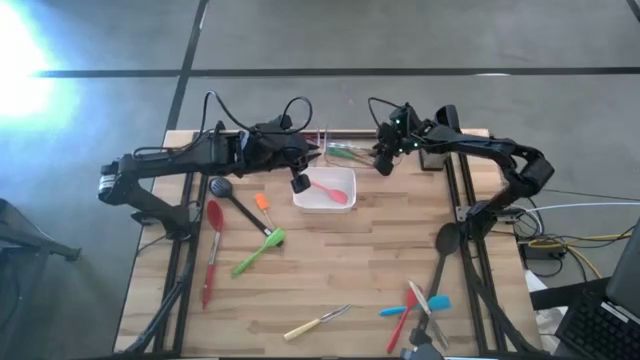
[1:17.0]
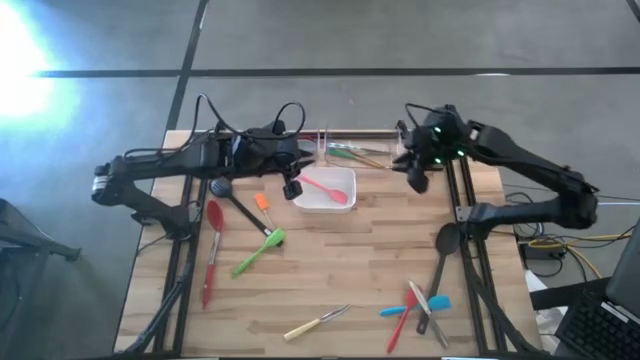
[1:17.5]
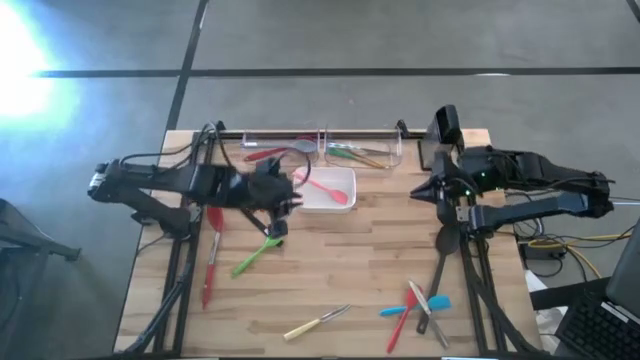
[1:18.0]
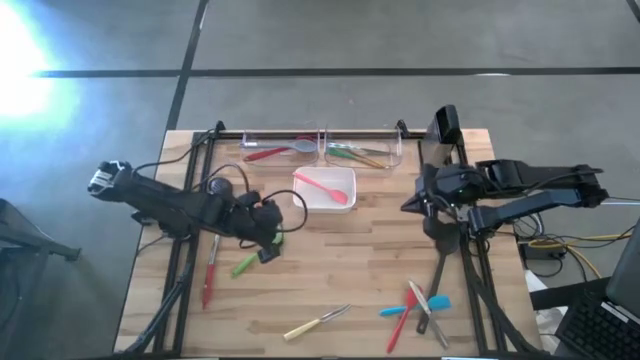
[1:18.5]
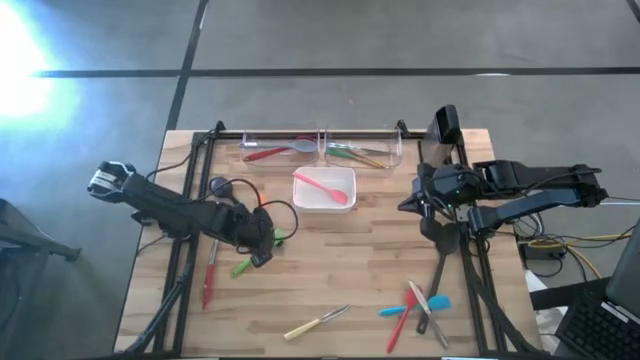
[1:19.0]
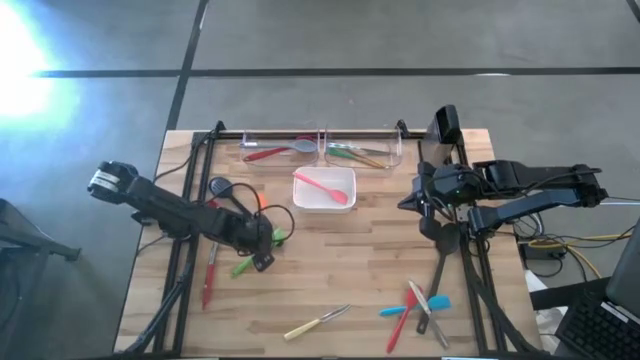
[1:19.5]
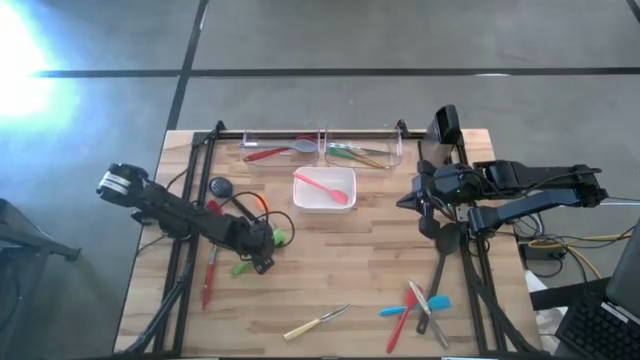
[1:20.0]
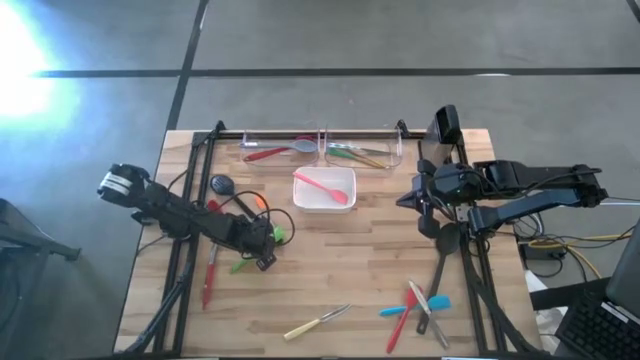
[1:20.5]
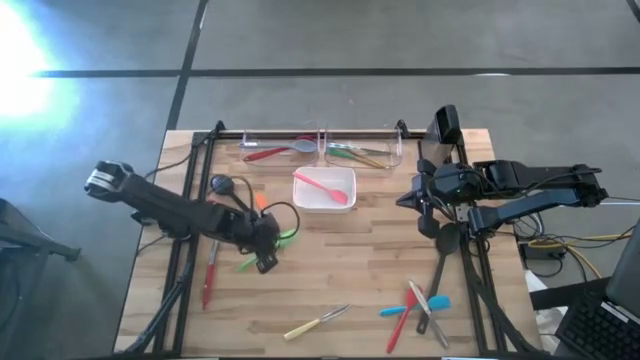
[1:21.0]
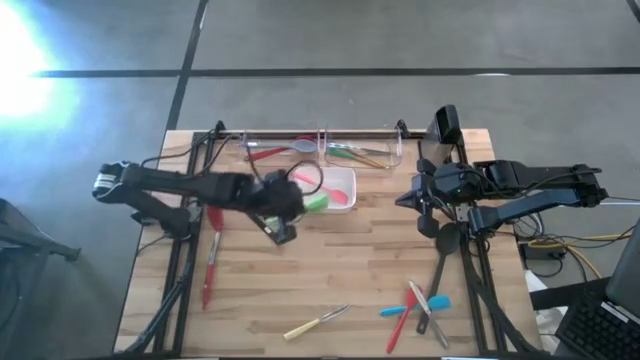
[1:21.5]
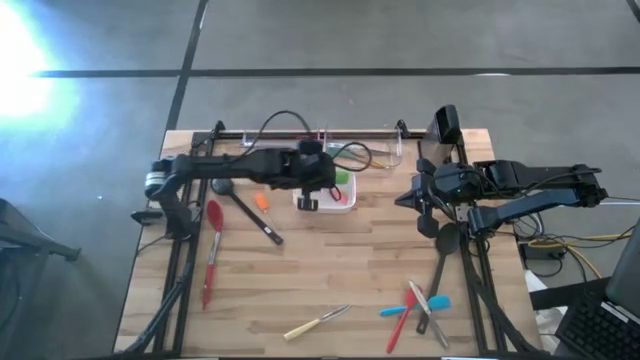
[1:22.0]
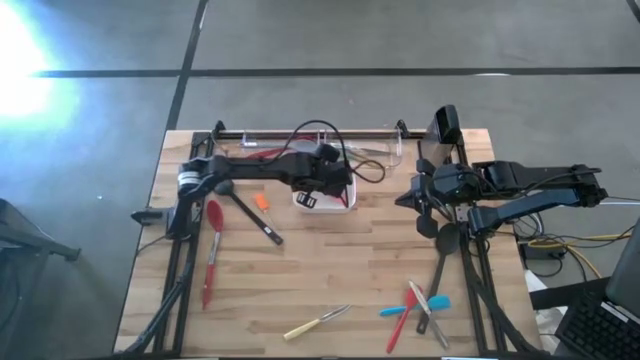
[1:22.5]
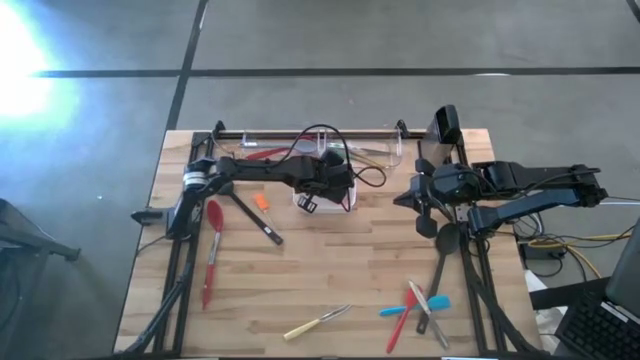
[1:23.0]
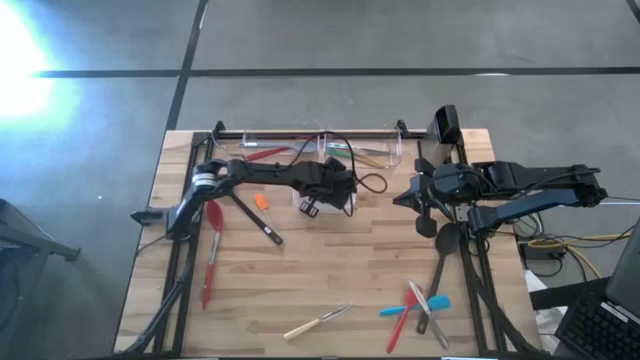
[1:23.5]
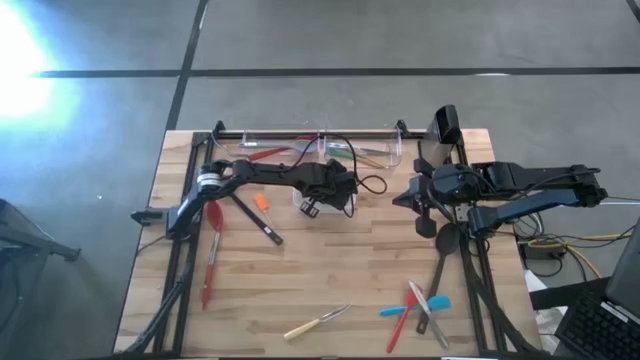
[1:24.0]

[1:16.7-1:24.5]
Task: Pick & Place Kitchen Items
Put the green spatula into the white bin

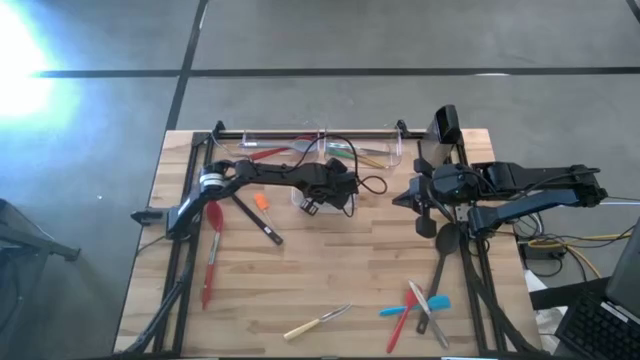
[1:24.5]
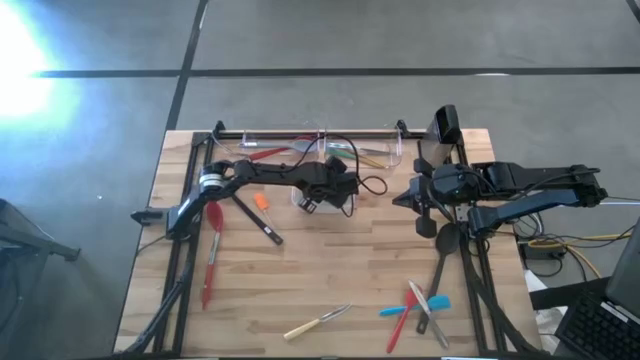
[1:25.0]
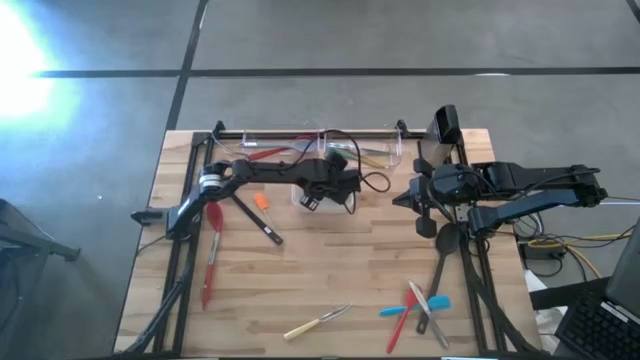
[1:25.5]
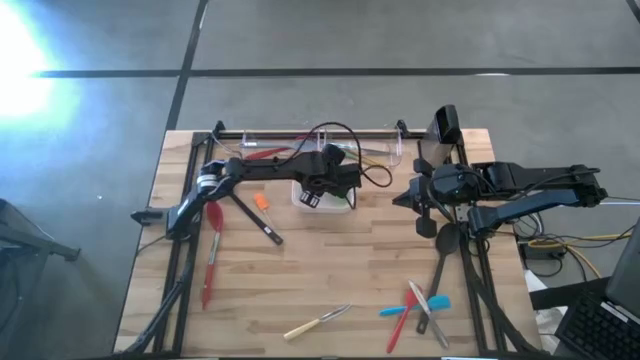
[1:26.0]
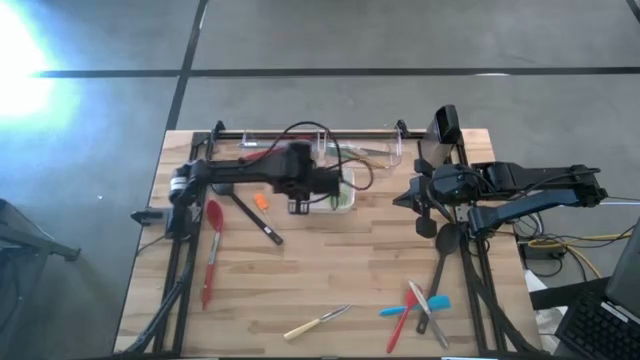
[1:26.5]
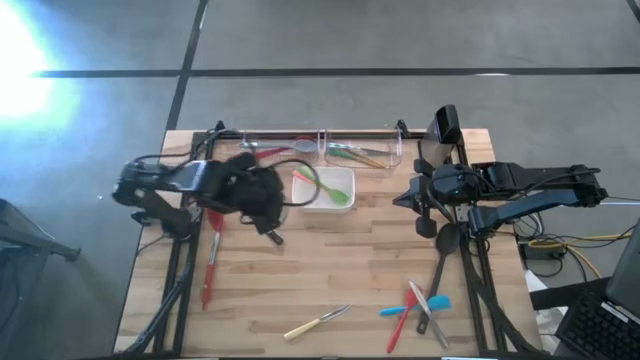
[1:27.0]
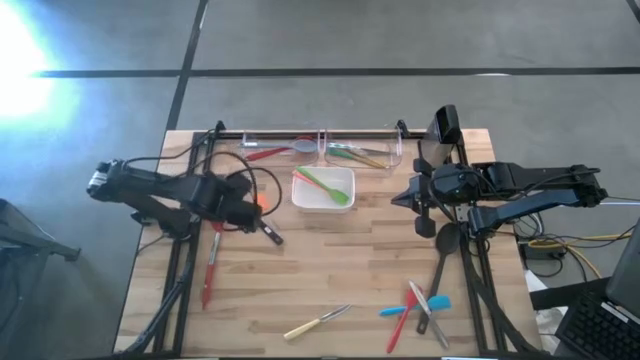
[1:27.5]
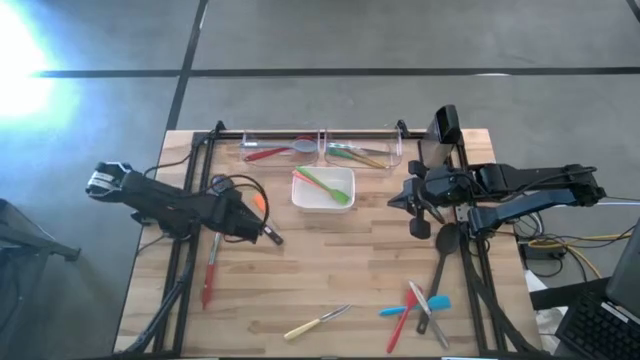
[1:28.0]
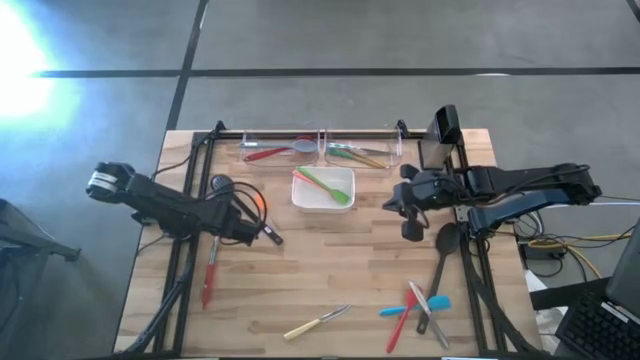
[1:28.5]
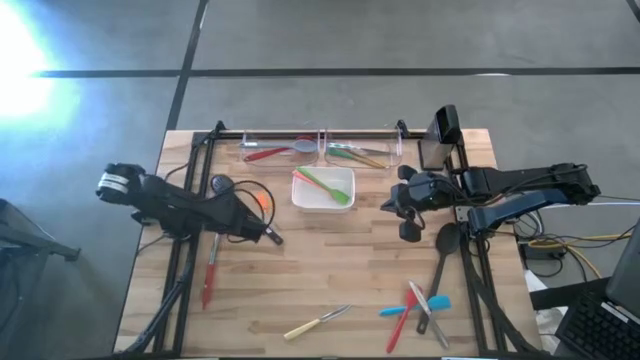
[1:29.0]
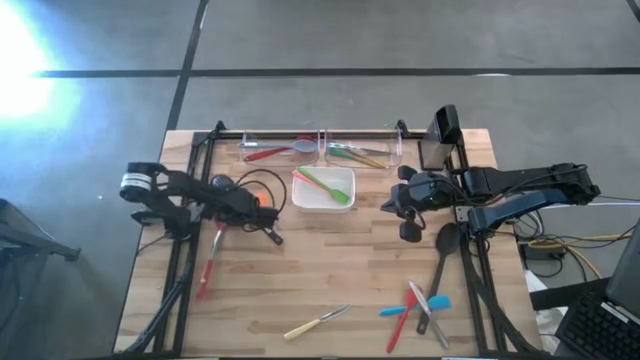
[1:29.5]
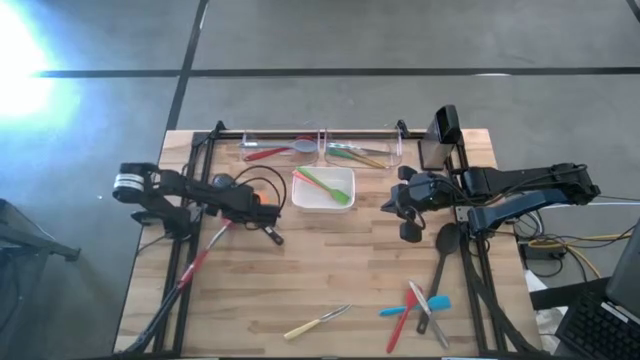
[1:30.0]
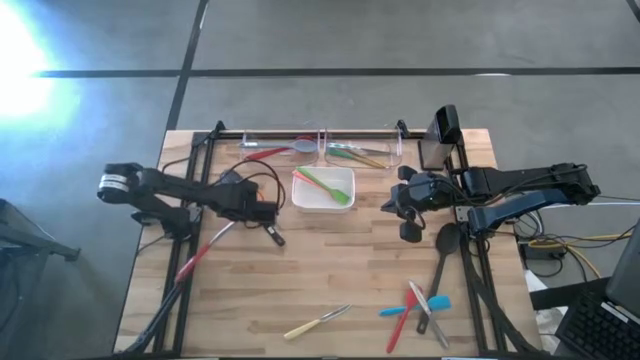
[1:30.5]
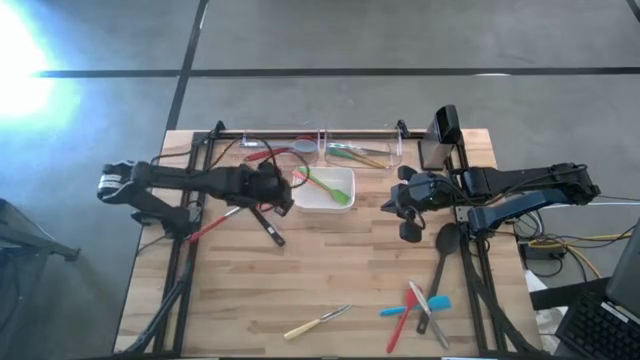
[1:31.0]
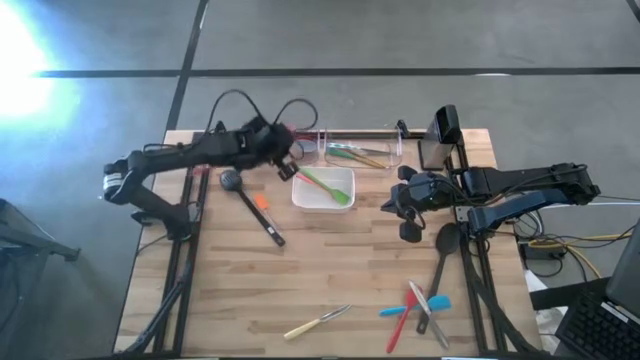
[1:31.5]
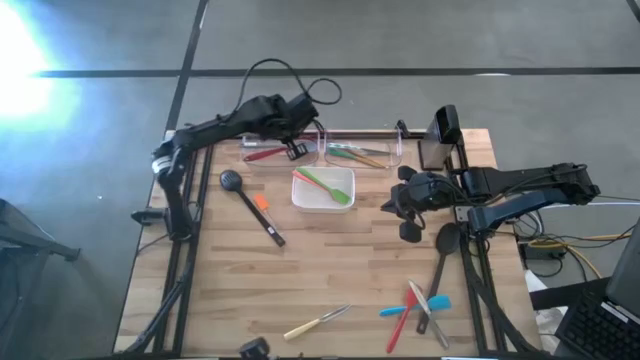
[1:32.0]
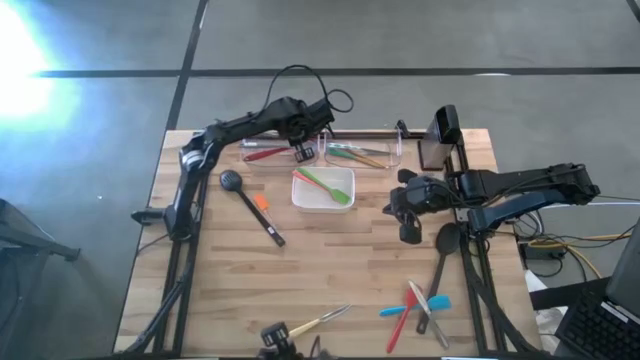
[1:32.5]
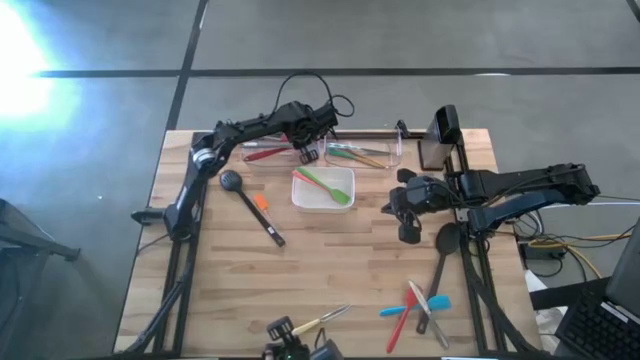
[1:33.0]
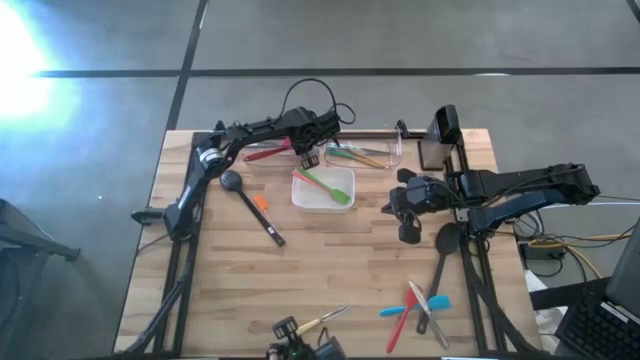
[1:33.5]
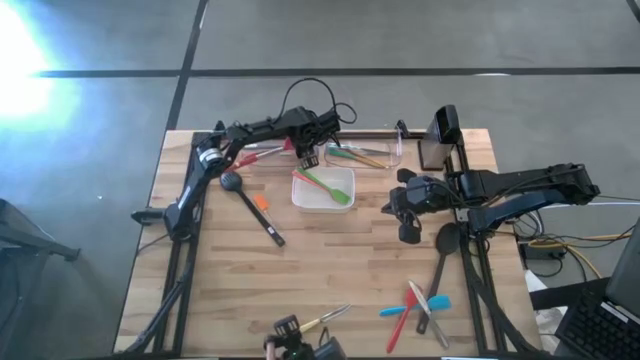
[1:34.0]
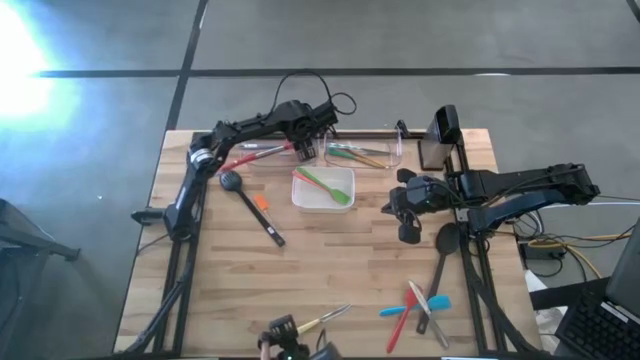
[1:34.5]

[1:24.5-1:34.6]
Put the red serving spoon into the left transparent bin

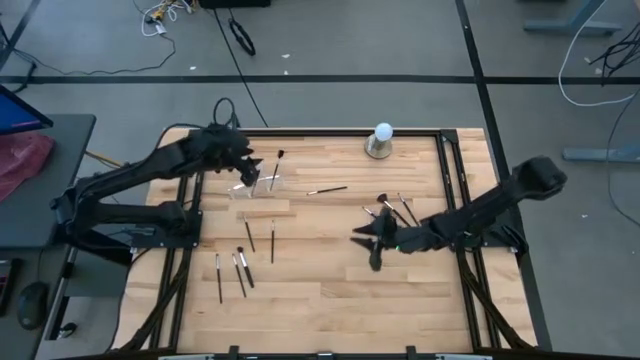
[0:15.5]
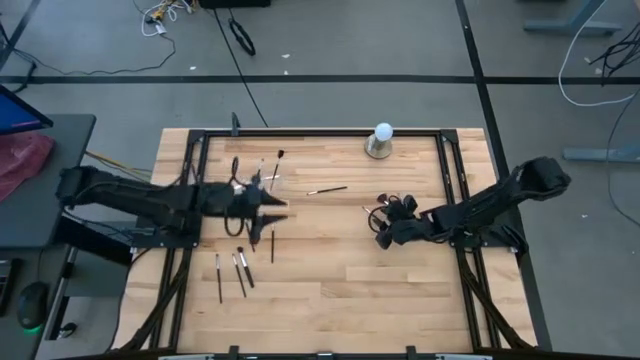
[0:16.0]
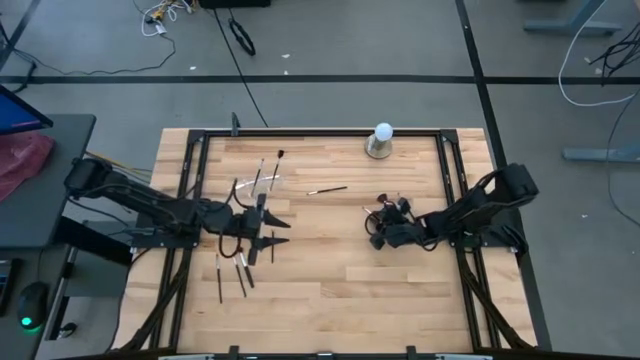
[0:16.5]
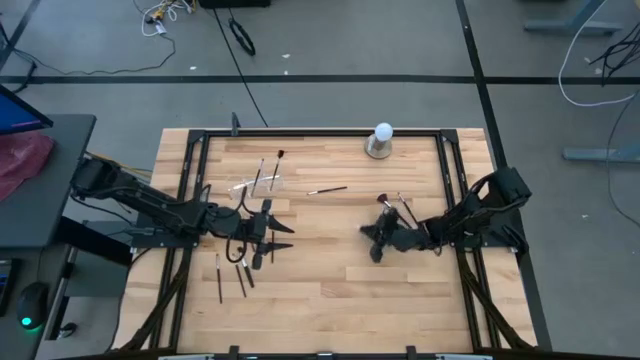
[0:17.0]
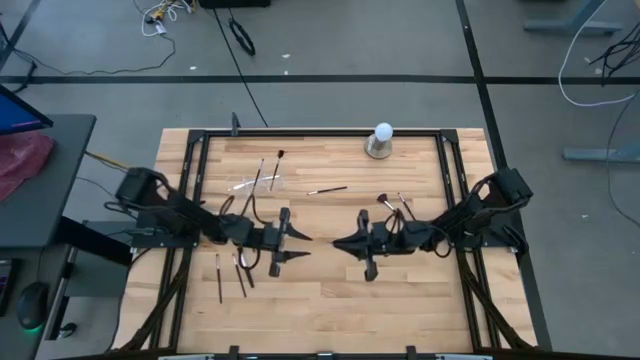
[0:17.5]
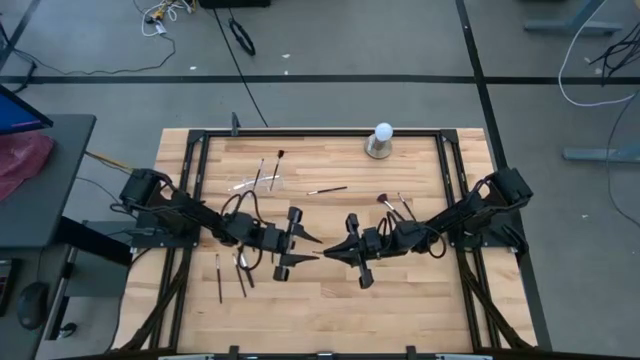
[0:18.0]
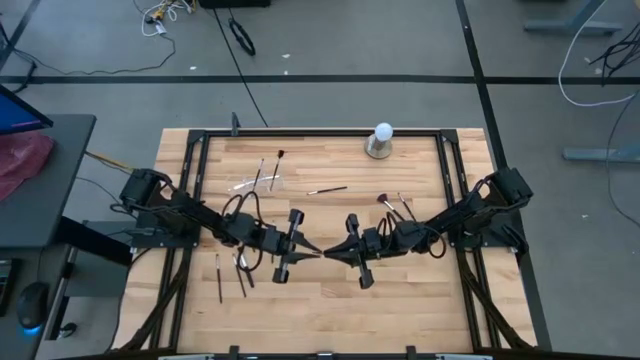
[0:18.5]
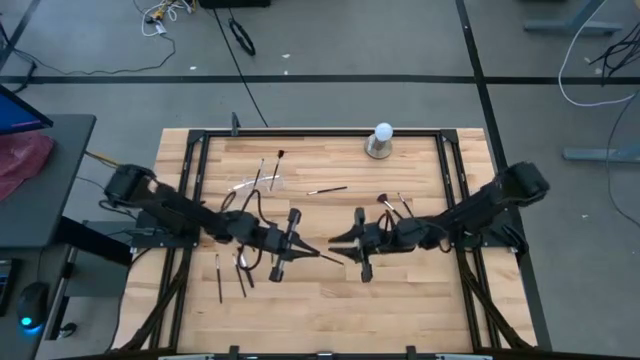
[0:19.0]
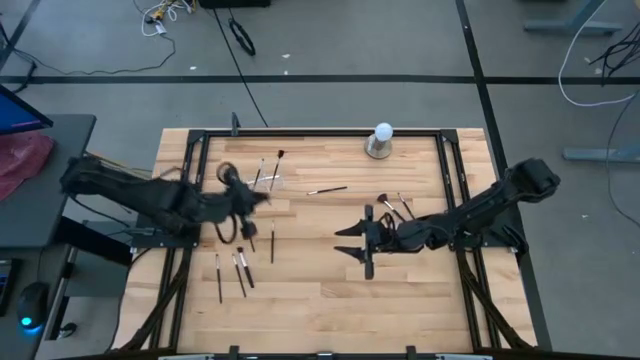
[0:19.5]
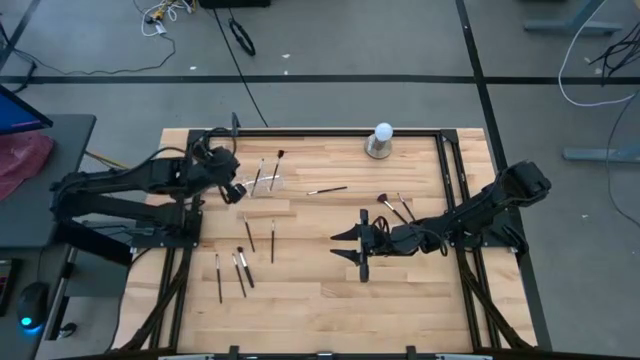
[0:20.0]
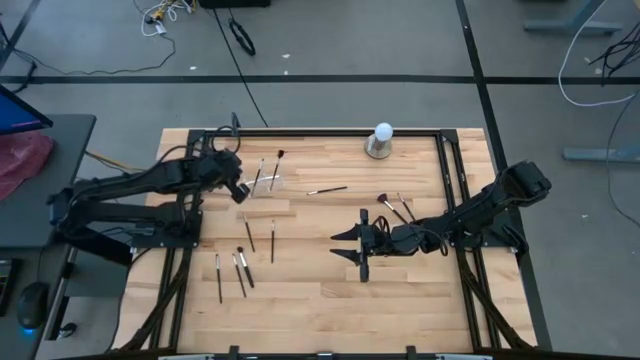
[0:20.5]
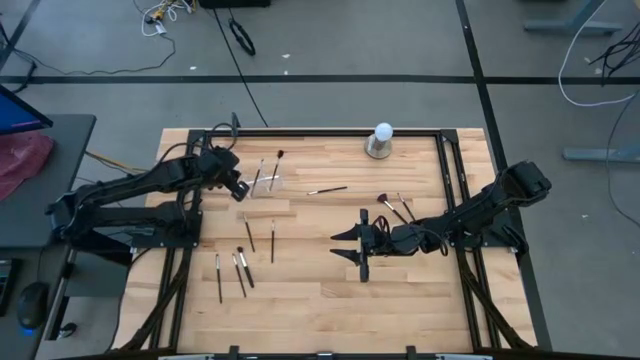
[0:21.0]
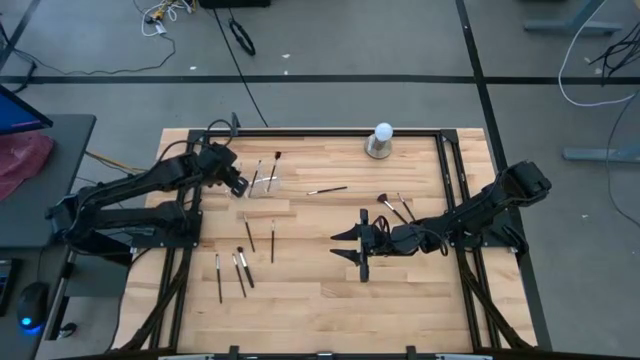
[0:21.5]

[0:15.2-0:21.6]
Task: Put items in baskets/containers
Put the black eyeshadow brush into the left section of the transparent organizer
